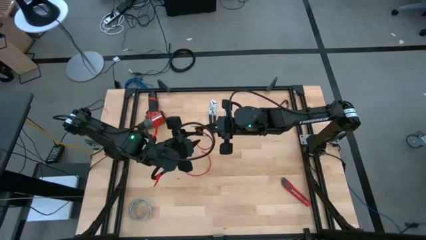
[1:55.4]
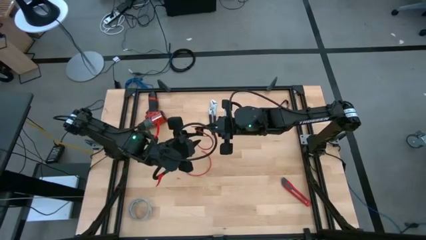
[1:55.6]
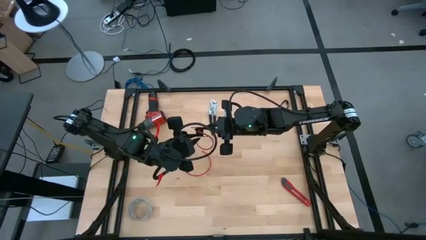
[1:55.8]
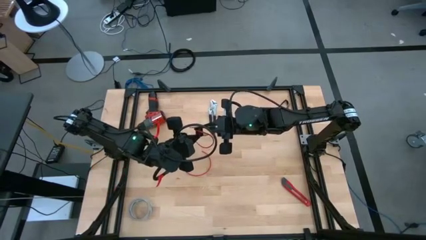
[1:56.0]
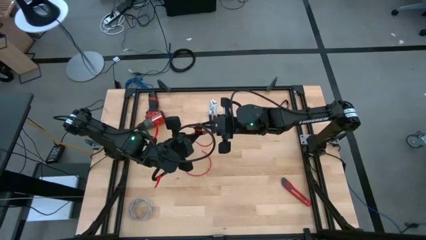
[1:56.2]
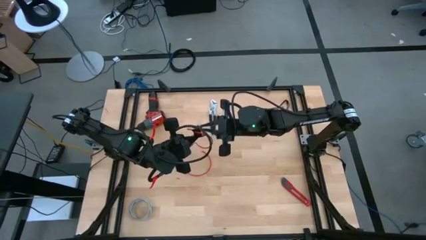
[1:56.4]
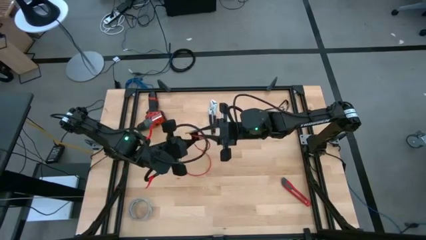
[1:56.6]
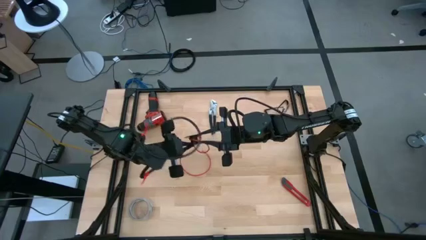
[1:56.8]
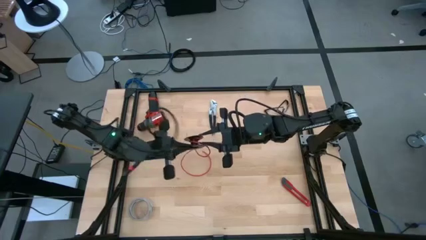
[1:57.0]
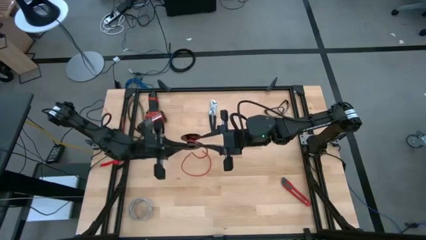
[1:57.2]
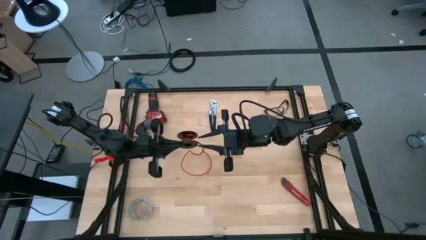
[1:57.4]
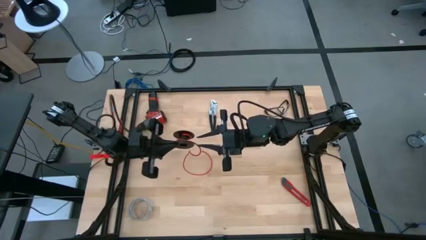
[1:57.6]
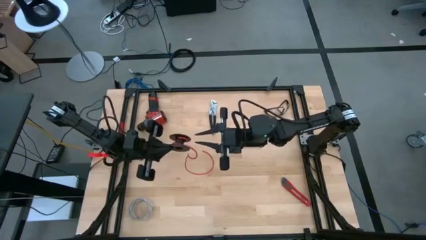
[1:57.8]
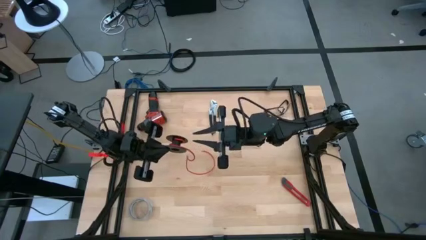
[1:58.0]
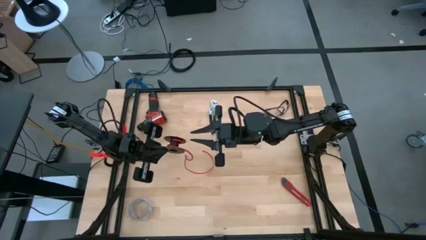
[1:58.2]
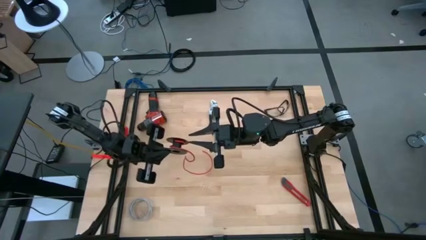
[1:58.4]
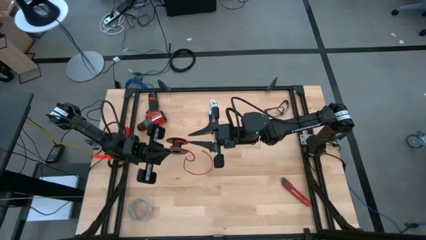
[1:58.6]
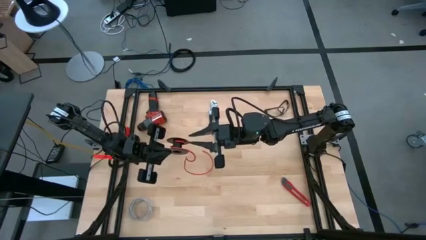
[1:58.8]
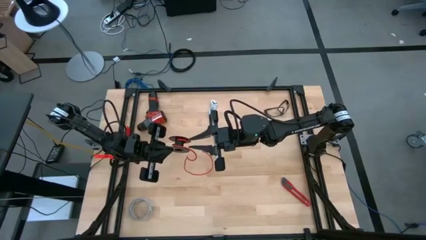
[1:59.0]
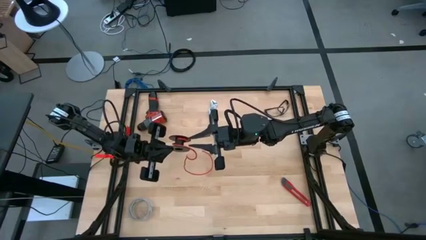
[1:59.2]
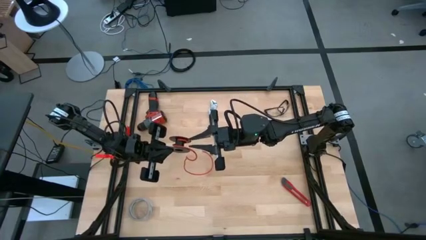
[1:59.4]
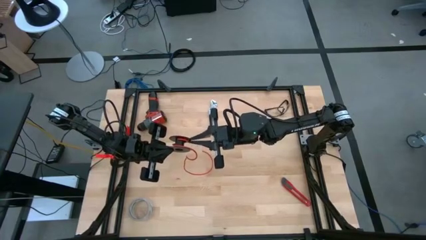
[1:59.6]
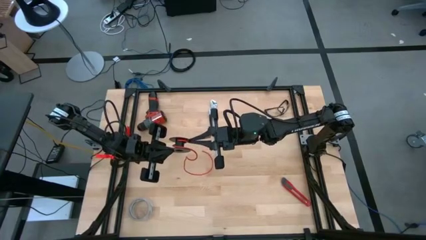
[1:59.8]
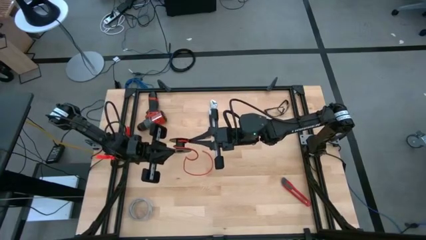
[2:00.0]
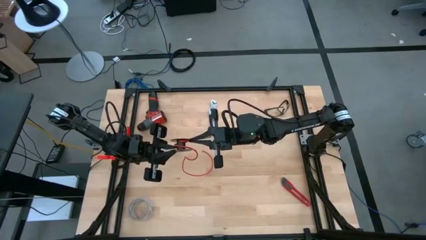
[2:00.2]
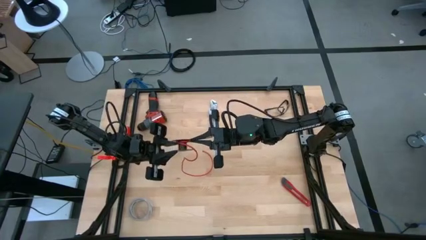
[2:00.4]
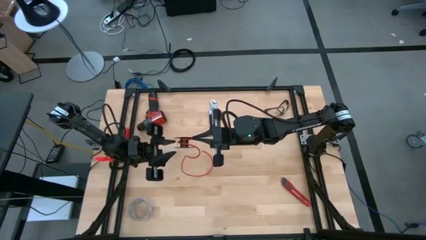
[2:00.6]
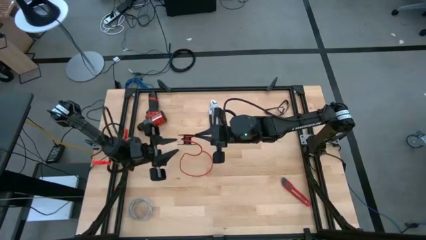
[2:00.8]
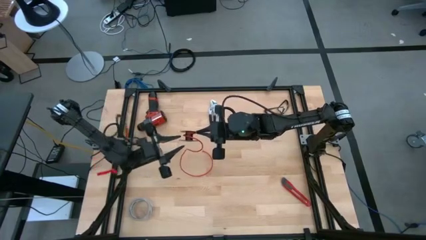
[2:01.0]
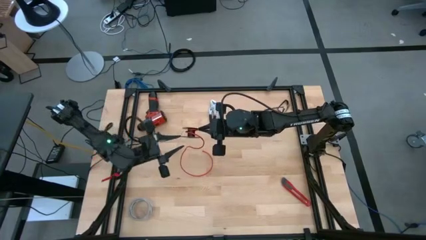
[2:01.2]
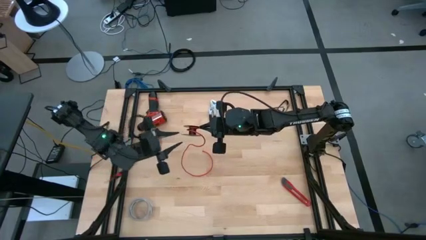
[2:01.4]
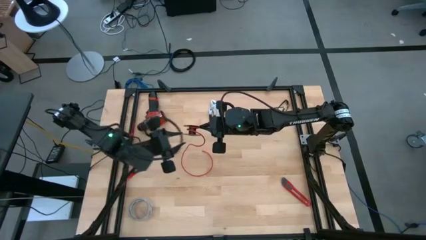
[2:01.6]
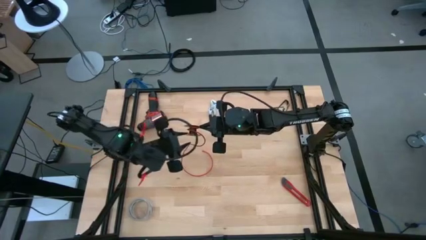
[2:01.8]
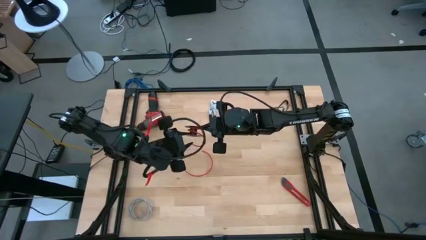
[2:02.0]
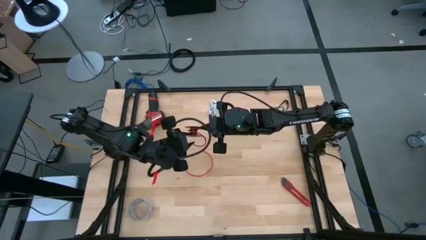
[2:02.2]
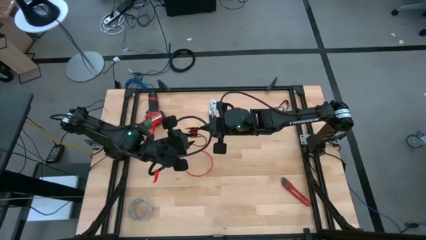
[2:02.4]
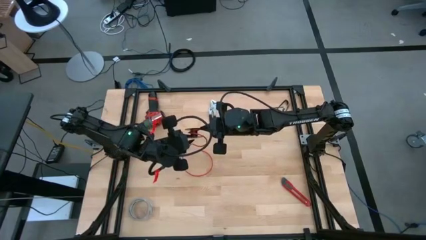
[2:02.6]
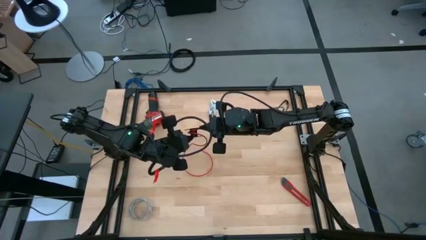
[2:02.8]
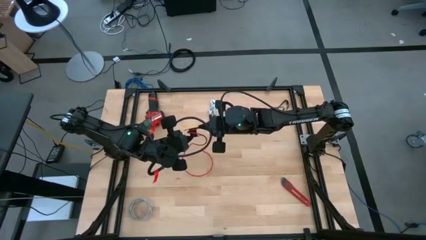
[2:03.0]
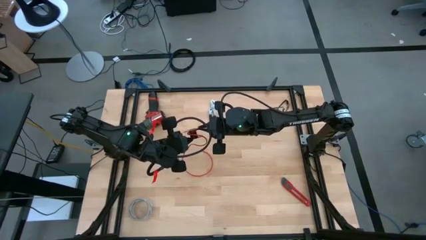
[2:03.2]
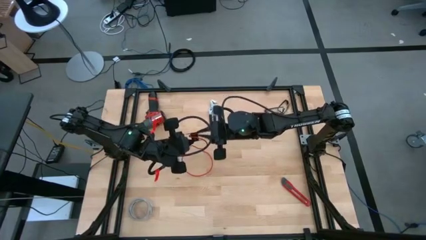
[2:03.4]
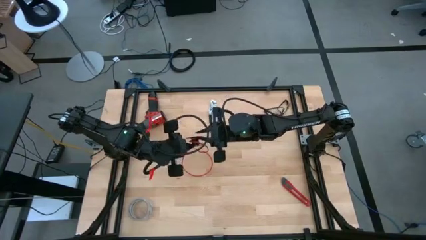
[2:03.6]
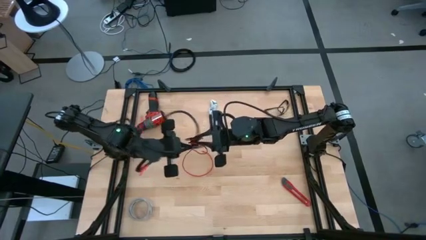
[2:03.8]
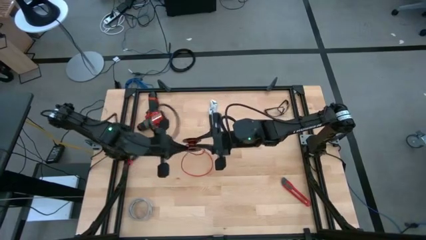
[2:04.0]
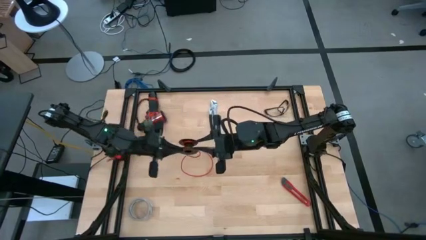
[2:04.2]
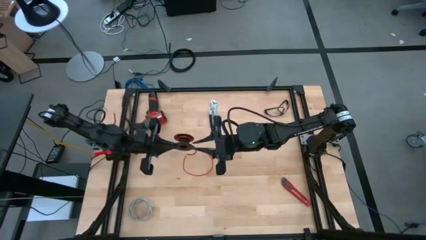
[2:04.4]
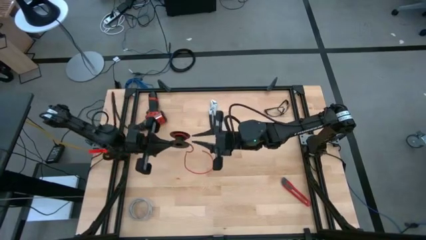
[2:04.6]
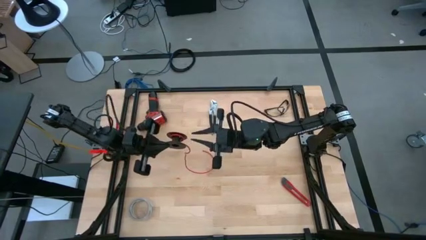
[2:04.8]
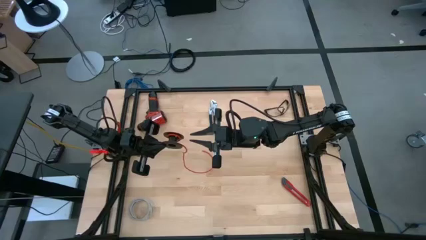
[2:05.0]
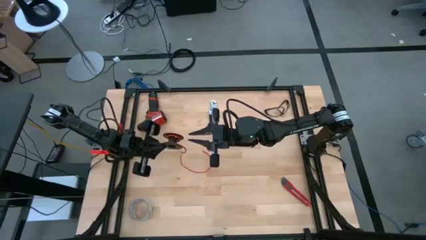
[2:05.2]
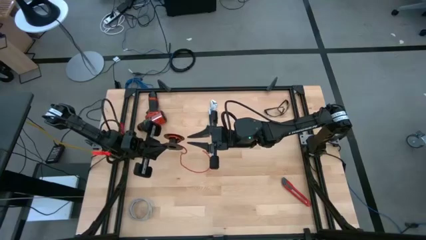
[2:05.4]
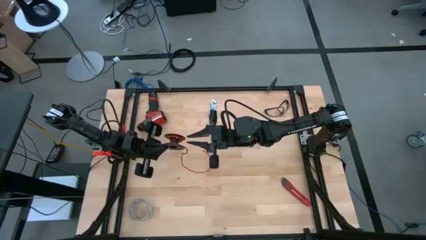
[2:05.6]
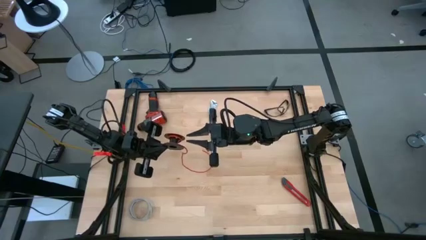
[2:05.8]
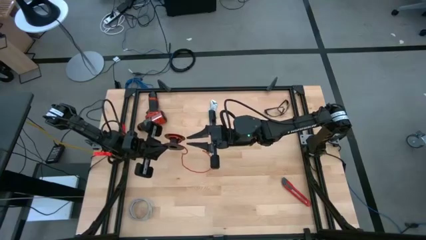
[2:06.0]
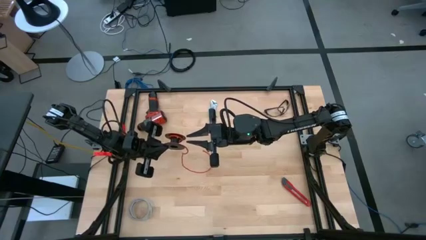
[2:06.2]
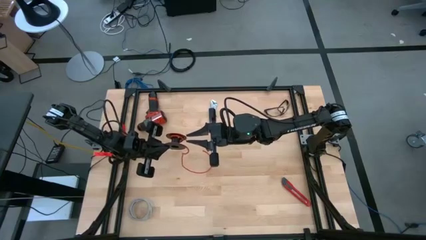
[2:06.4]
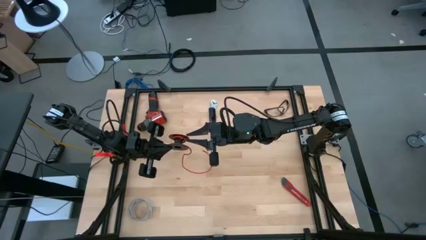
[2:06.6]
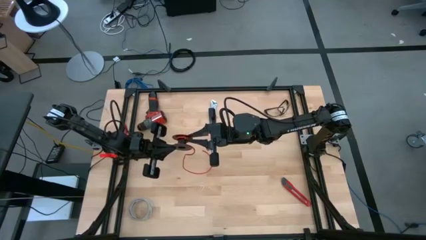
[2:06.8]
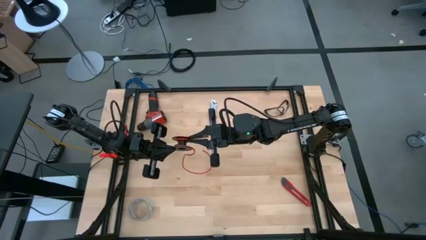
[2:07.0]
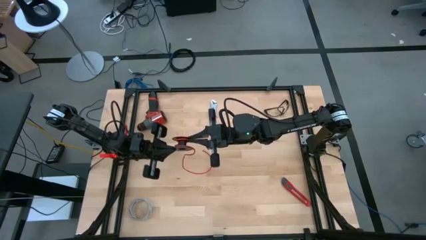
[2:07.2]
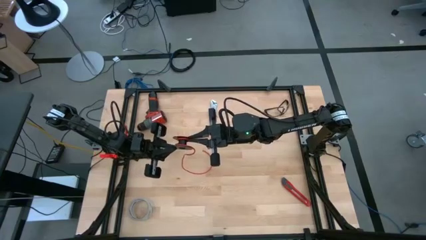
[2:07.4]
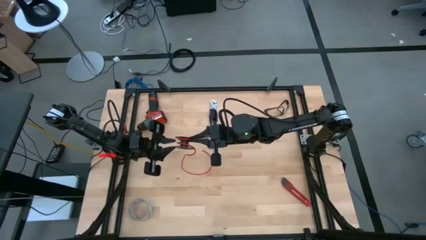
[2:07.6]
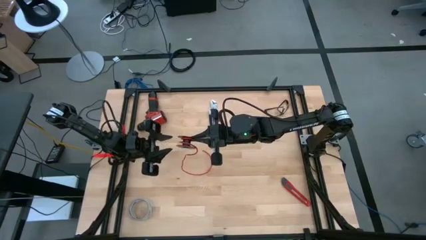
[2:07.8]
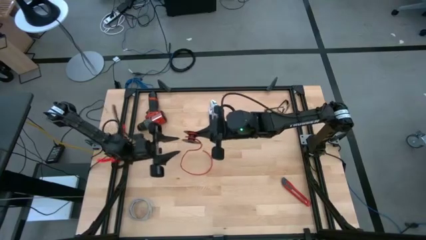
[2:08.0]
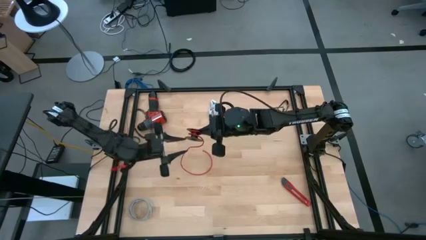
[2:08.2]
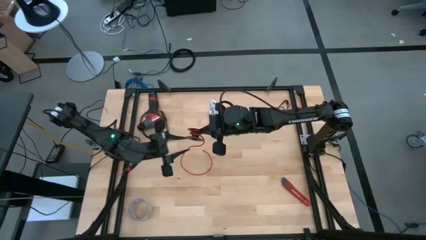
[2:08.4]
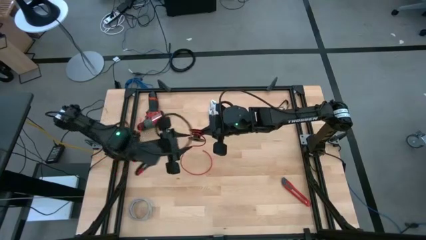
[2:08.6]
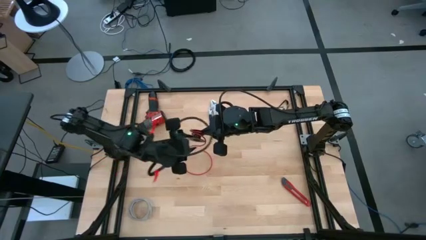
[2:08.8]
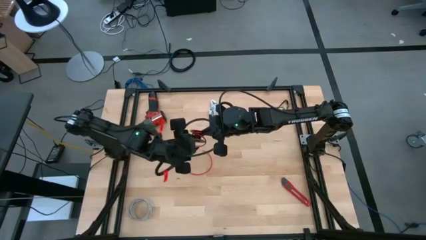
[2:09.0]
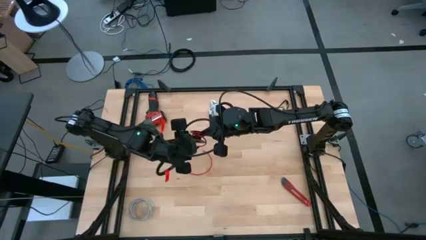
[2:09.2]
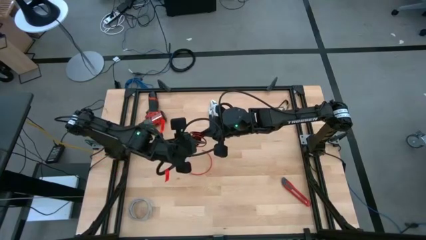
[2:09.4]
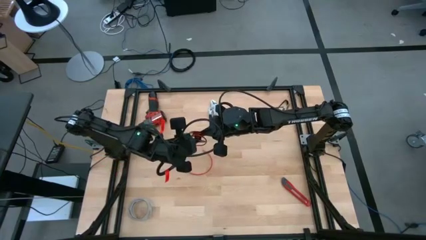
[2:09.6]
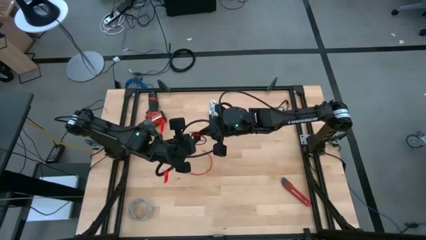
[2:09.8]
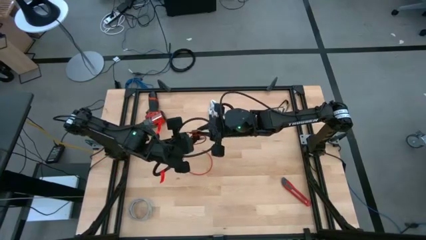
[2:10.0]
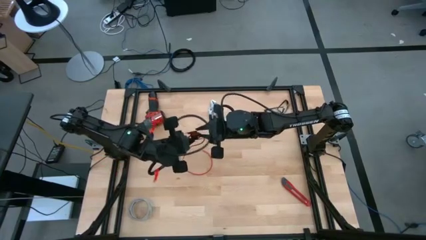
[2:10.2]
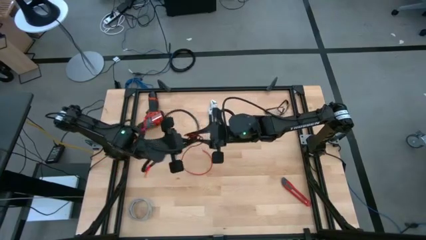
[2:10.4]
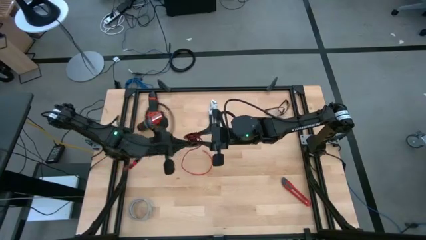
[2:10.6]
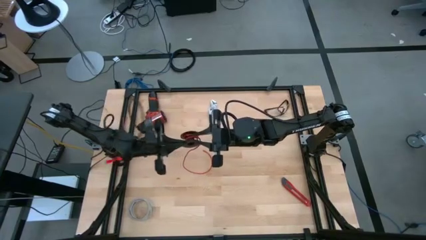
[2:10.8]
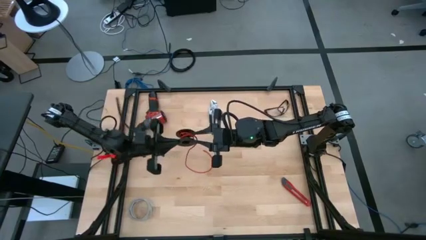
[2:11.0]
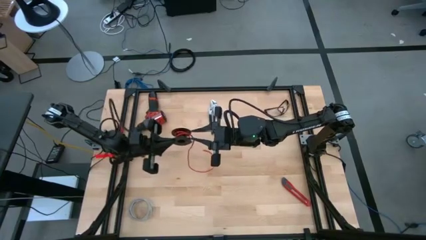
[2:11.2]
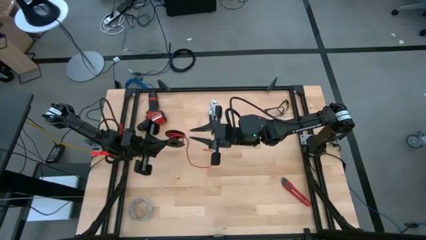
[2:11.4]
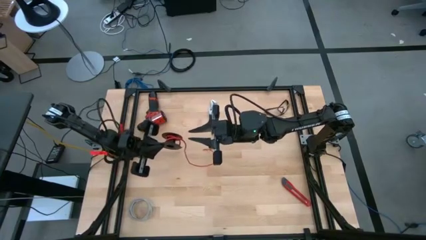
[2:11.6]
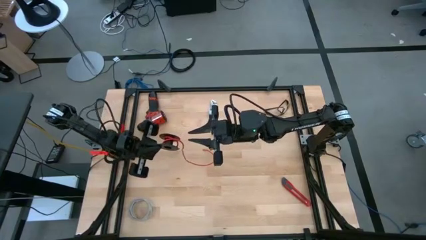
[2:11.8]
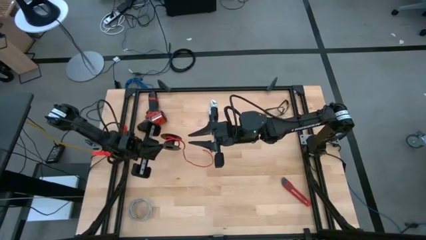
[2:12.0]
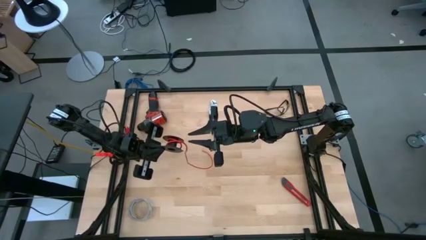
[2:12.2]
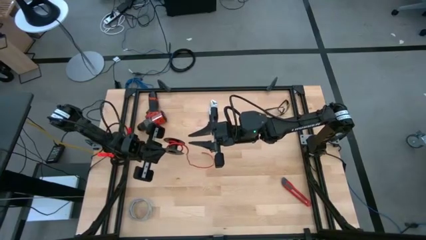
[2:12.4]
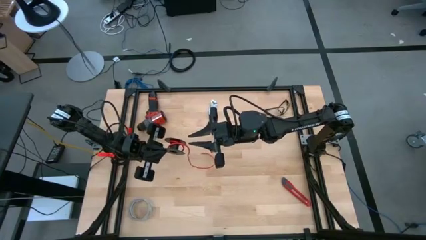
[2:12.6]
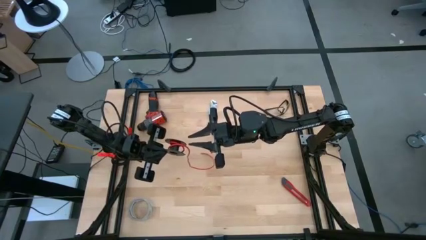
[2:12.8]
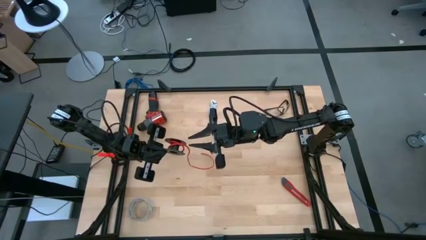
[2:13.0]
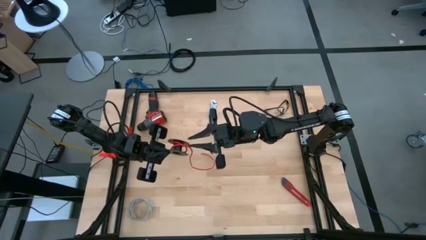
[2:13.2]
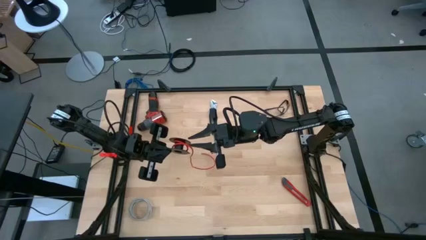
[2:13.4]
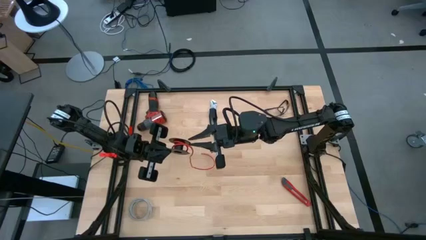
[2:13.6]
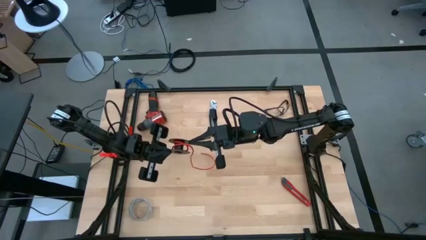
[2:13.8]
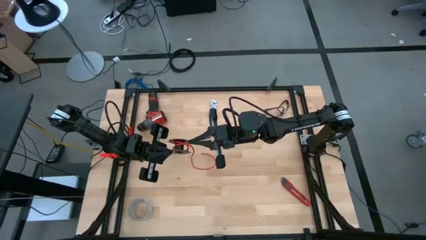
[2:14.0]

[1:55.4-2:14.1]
Task: Coil cords
Coil the red wire onto the black spool
